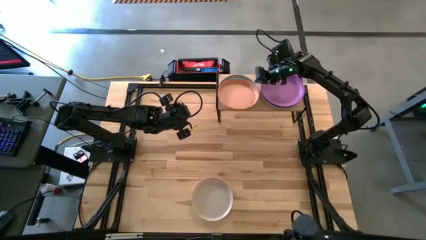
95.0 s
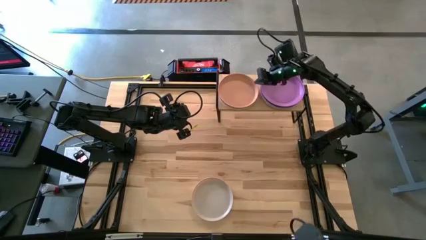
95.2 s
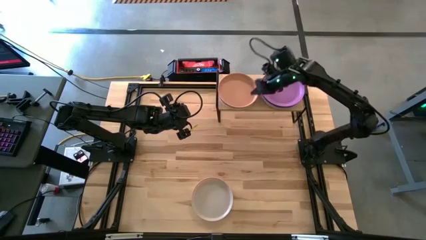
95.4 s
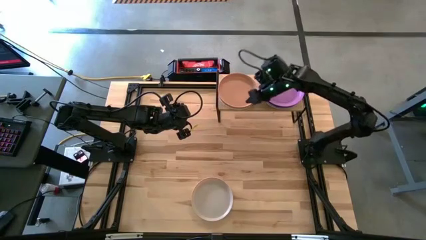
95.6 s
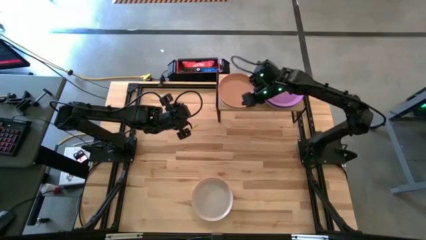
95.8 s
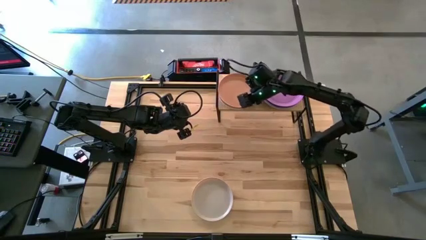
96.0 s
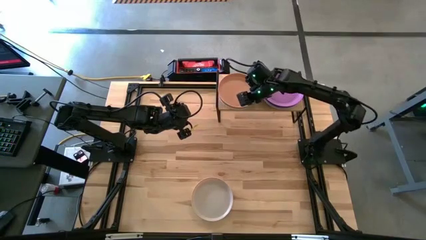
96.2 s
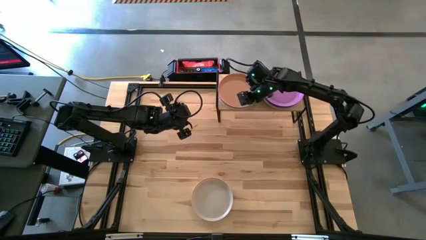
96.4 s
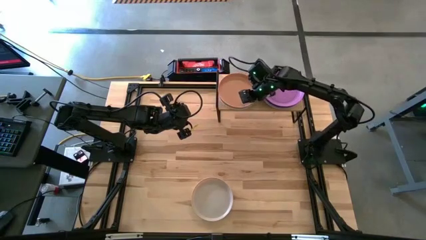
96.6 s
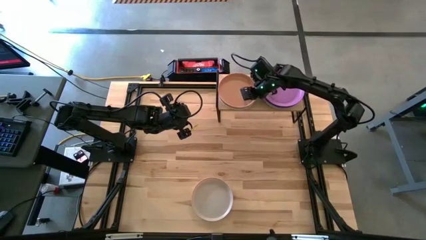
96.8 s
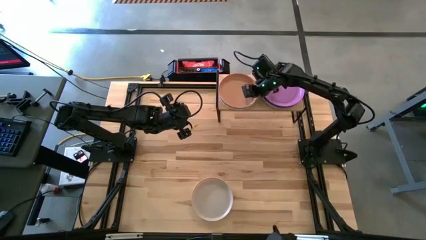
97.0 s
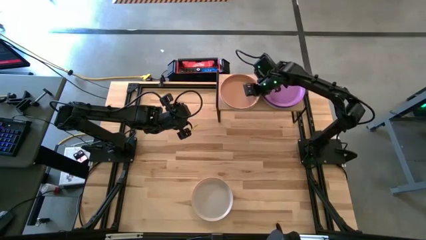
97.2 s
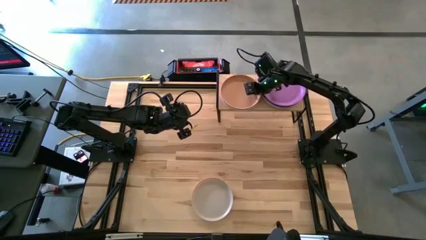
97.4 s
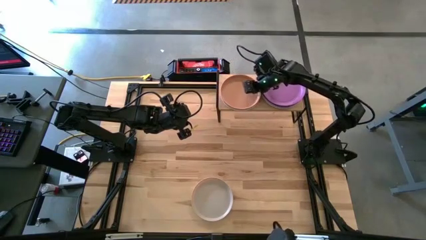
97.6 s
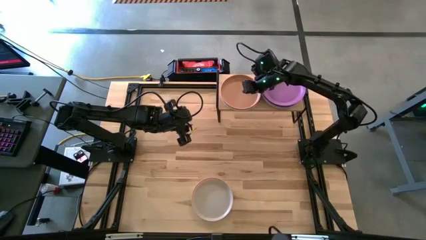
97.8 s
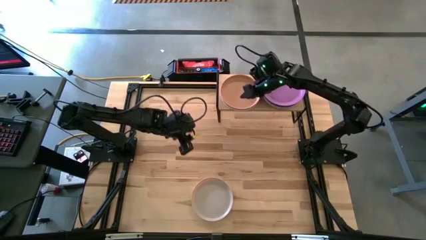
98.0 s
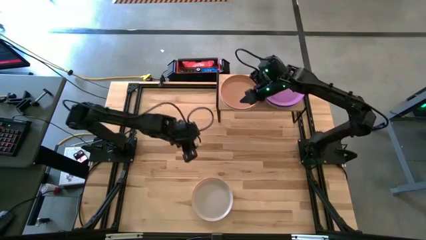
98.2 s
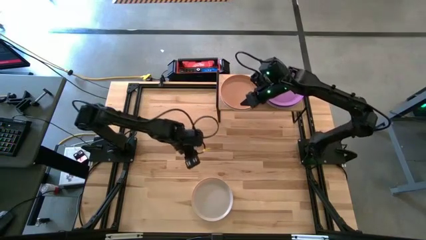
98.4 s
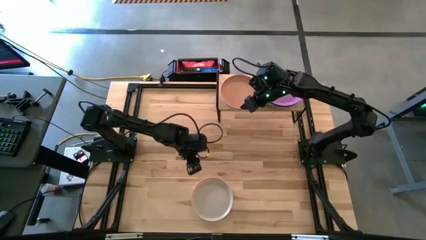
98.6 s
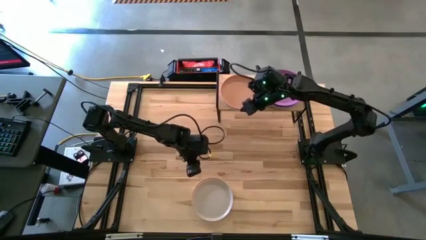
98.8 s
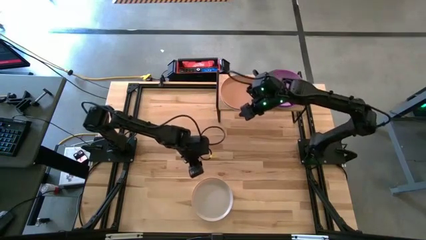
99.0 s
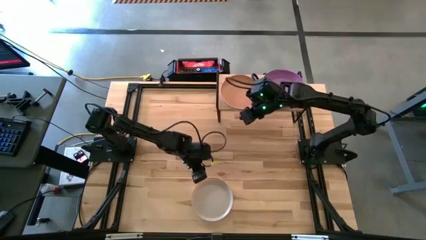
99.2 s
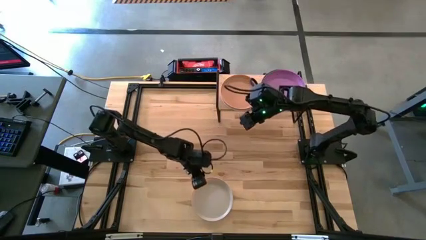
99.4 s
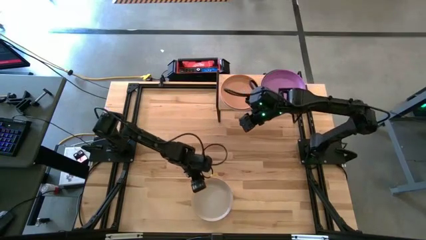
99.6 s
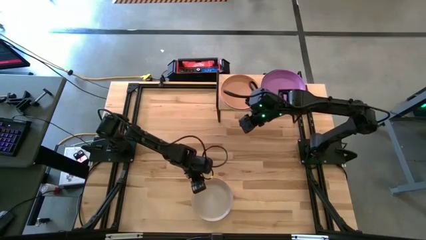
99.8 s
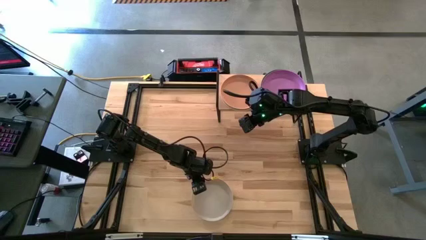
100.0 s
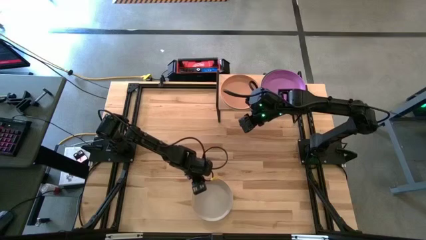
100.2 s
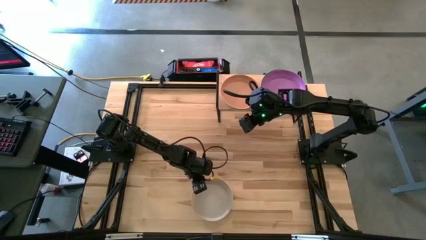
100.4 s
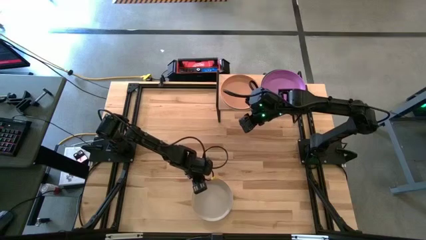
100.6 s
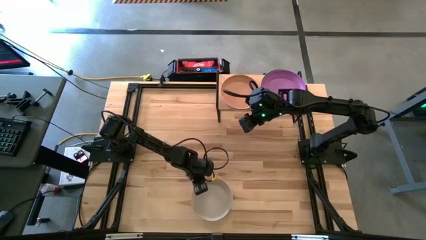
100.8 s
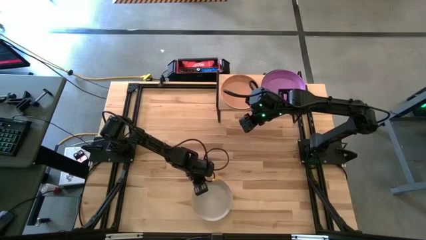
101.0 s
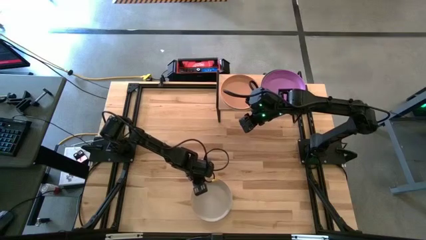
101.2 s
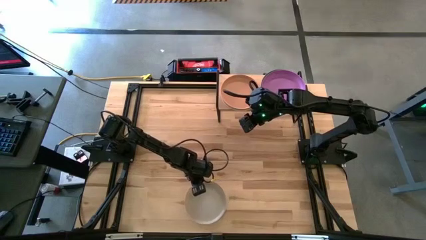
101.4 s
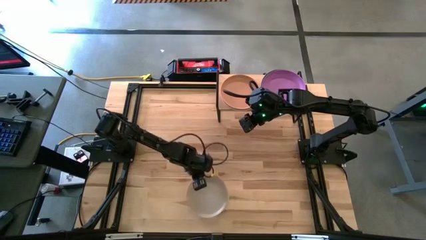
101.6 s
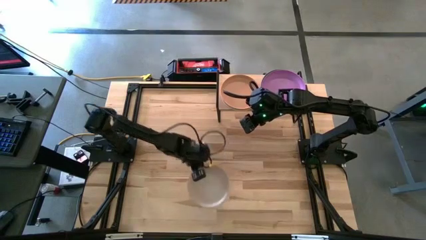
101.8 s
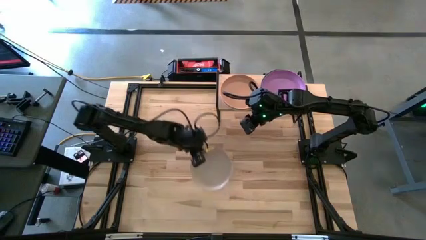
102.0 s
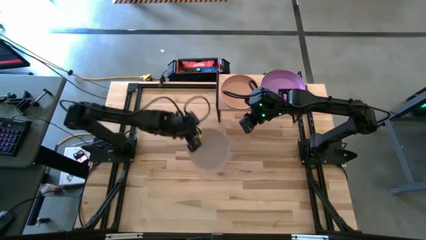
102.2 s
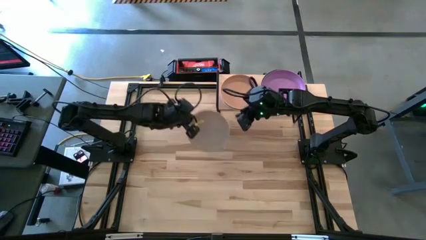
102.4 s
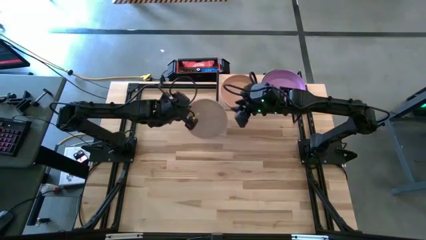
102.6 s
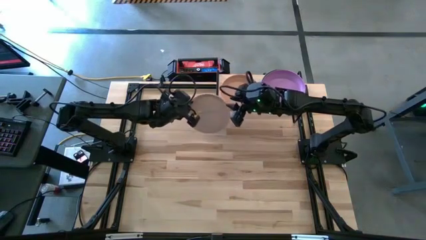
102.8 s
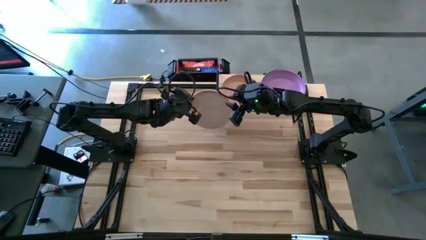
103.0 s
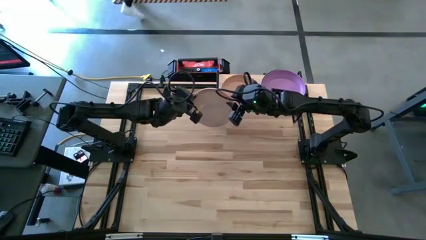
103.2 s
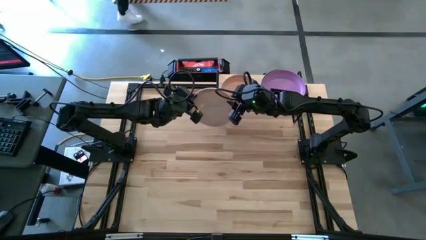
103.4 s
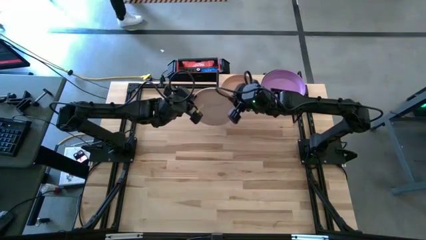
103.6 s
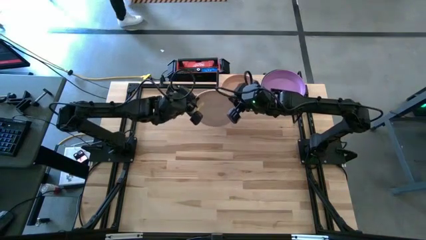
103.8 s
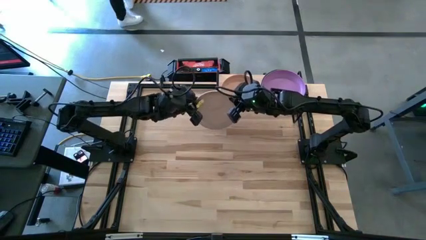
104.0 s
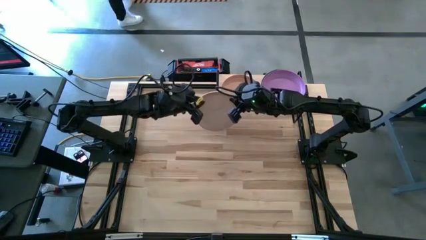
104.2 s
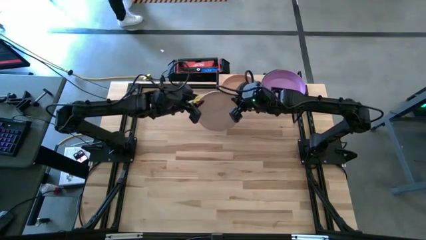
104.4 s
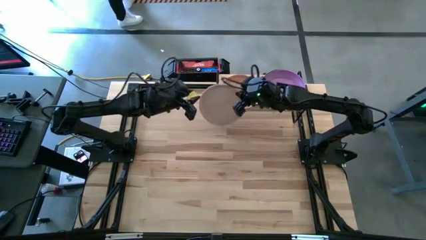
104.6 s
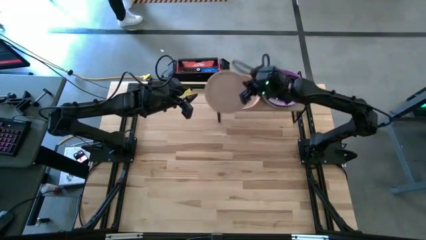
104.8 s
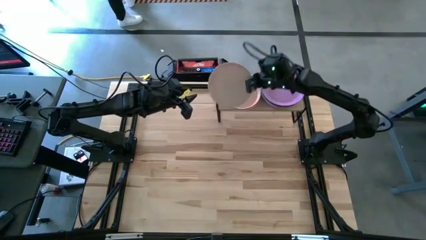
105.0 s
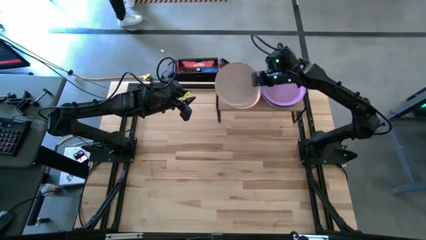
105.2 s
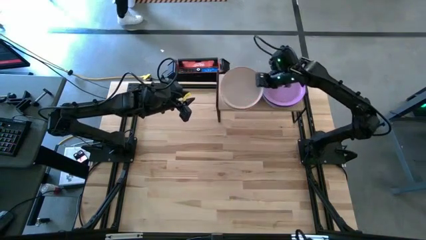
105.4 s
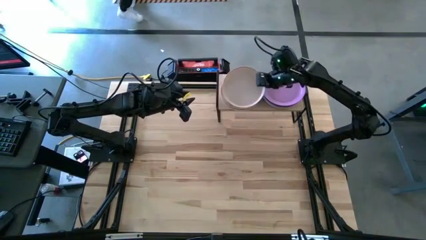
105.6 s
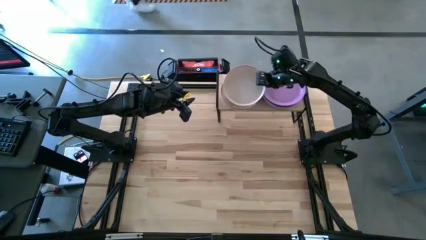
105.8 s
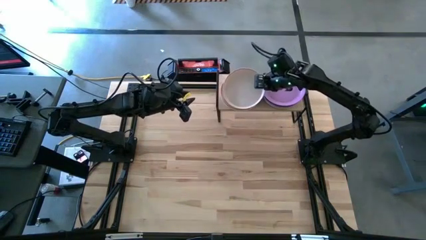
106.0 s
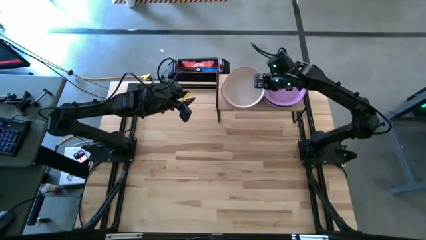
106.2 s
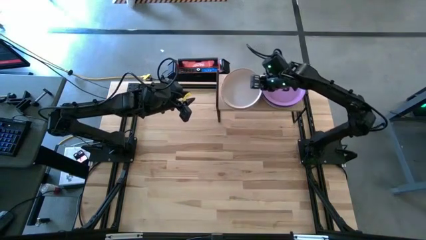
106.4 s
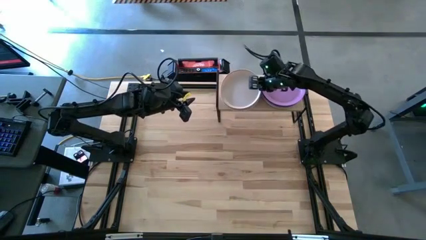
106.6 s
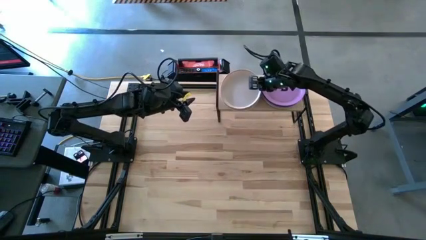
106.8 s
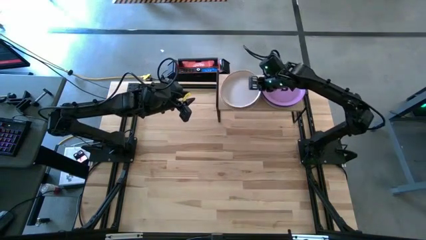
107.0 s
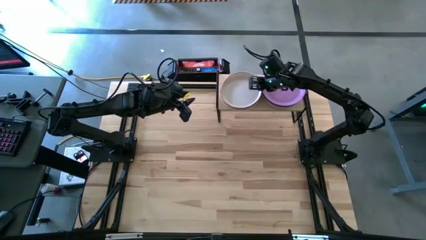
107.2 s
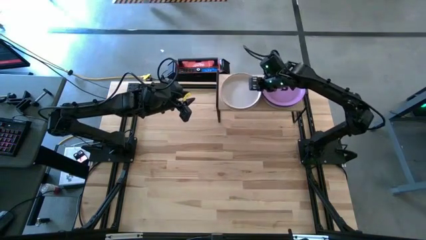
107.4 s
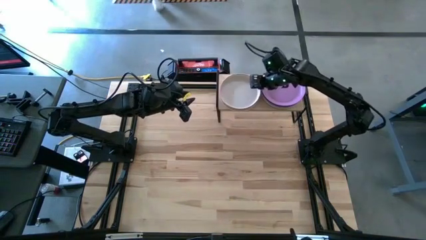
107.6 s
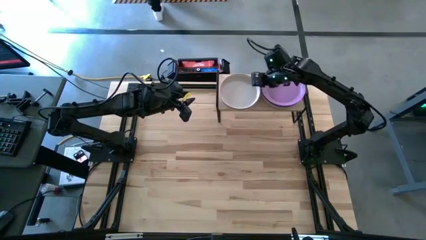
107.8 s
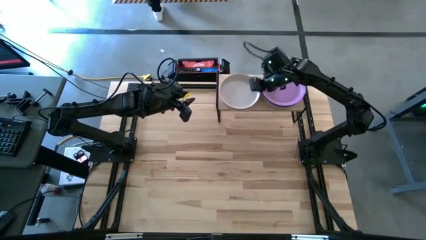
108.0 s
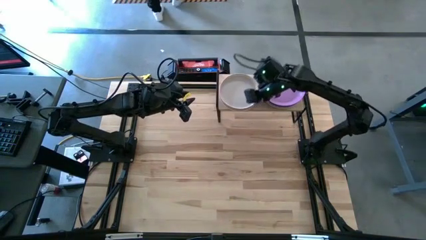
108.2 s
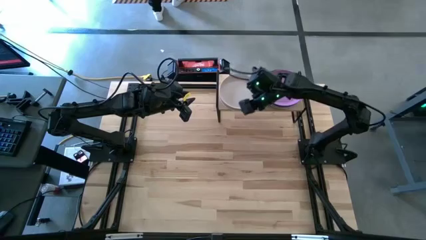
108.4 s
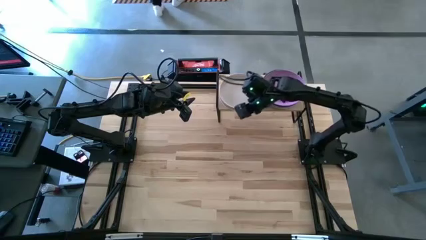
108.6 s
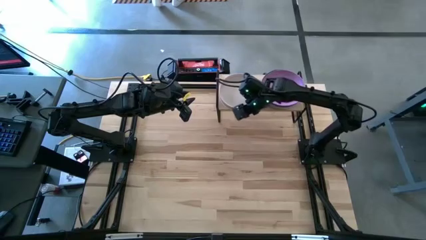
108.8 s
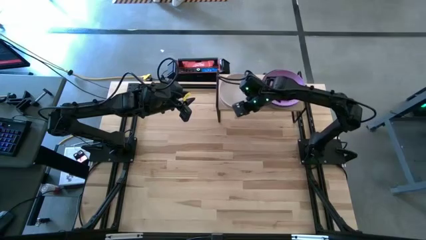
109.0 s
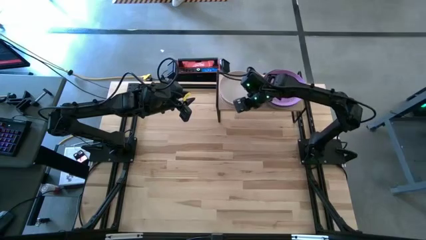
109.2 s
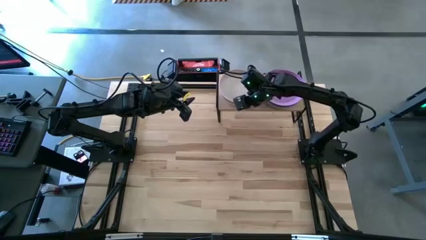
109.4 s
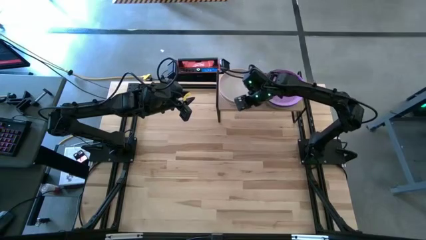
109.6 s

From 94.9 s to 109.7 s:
Task: Place and stack plates onto a shelf
Stack the white plate on top of the brown plate on the shelf

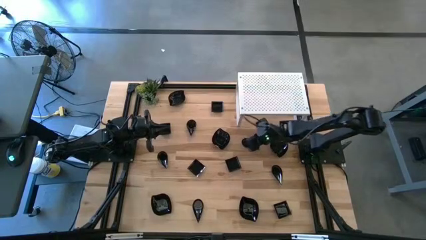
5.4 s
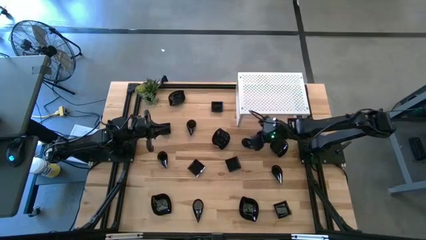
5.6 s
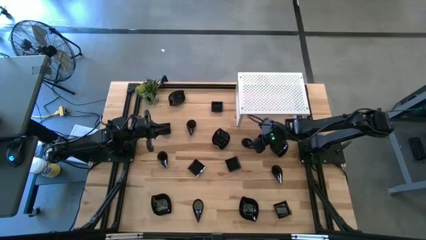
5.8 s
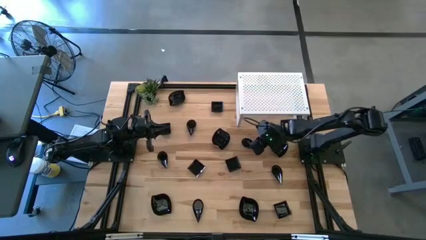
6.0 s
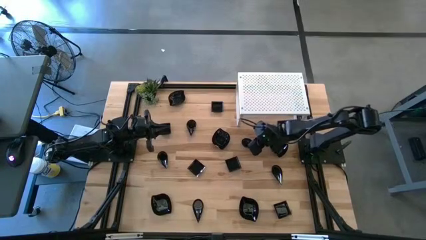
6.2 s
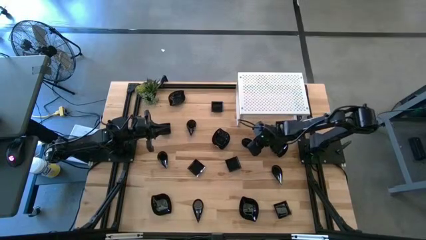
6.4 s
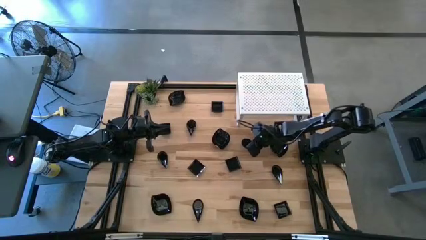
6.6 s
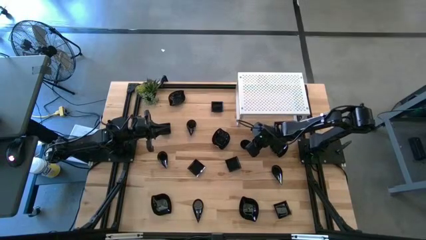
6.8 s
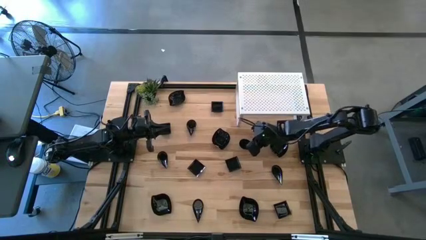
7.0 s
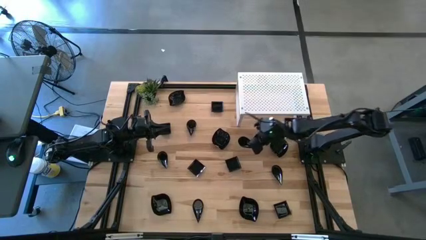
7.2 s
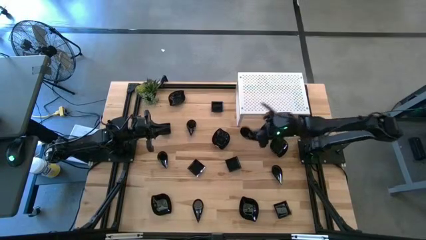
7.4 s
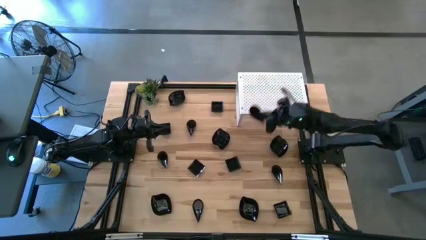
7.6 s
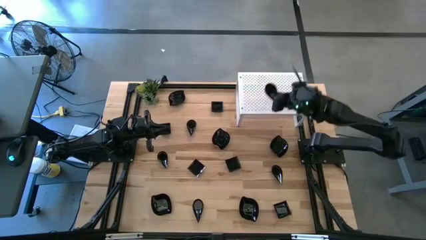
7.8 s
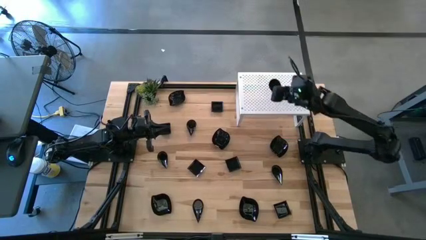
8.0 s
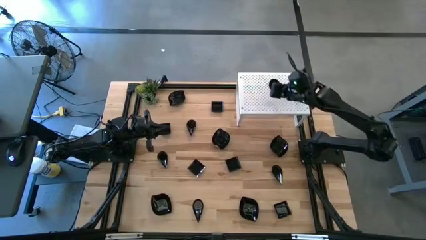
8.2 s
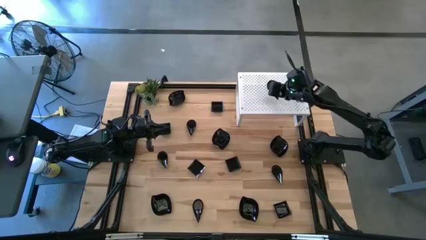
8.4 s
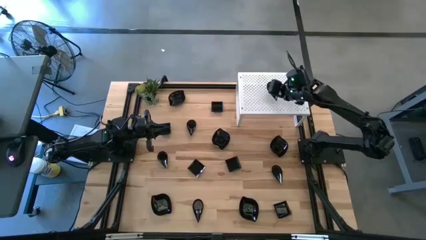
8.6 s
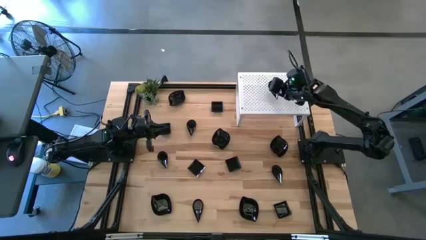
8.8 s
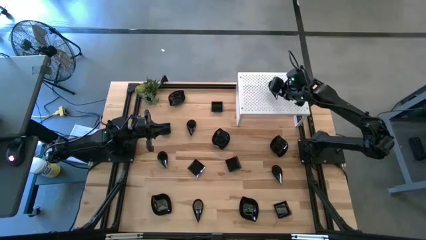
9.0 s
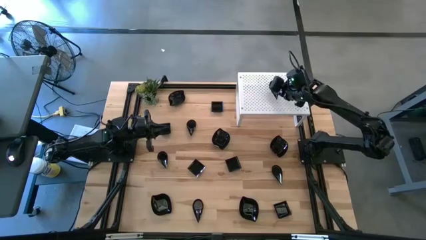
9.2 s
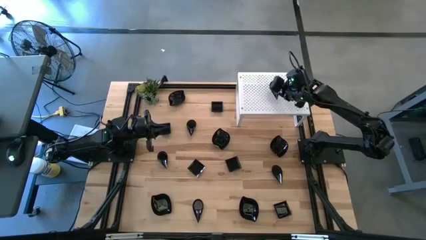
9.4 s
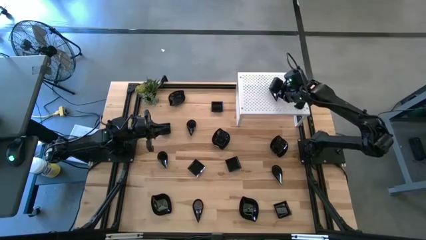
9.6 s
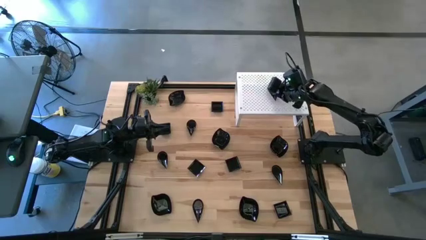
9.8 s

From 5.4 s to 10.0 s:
Task: Pick & Place Mini shaped plates
Put the black drop-shaped plate on the shelf
